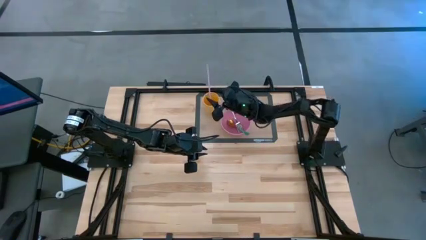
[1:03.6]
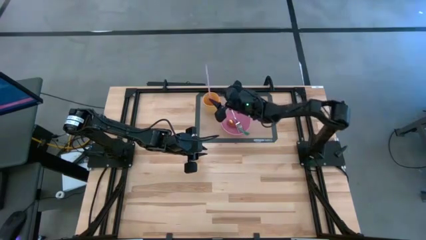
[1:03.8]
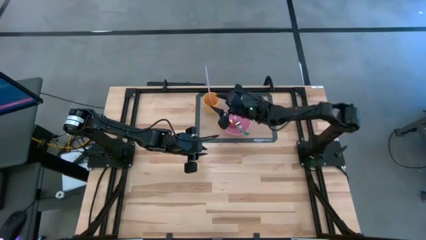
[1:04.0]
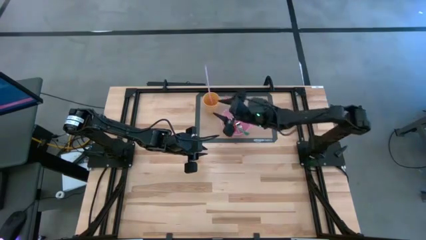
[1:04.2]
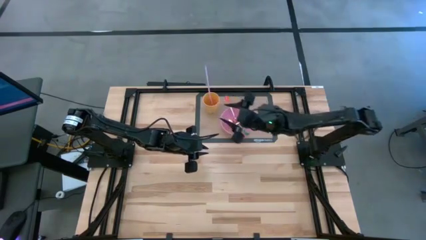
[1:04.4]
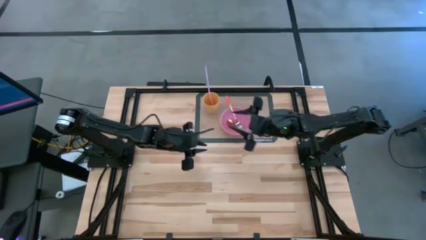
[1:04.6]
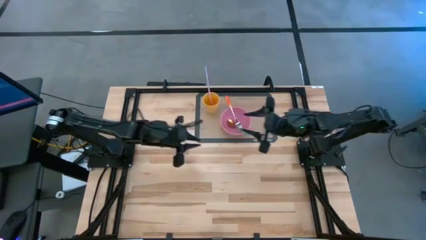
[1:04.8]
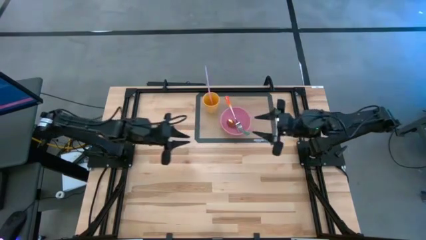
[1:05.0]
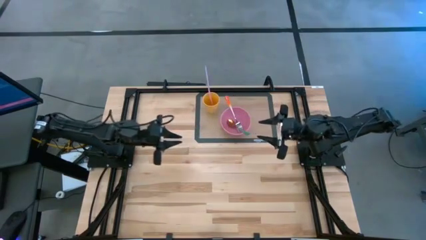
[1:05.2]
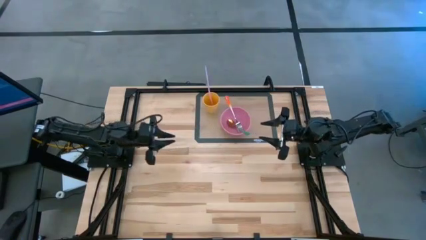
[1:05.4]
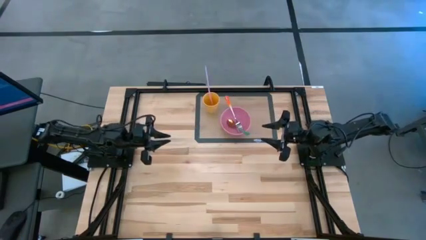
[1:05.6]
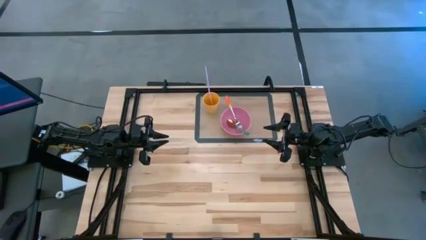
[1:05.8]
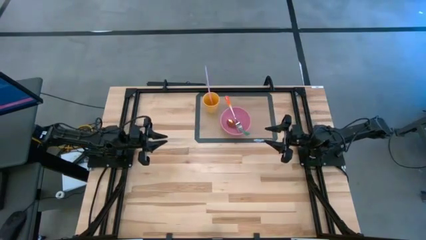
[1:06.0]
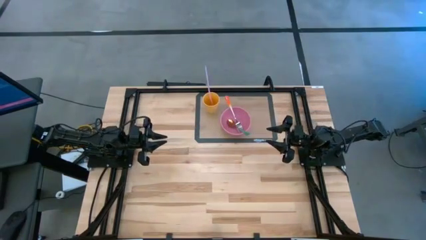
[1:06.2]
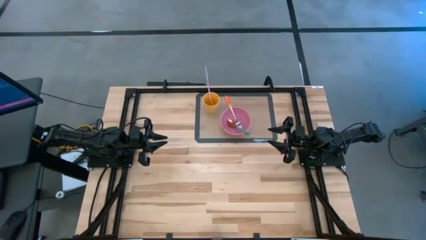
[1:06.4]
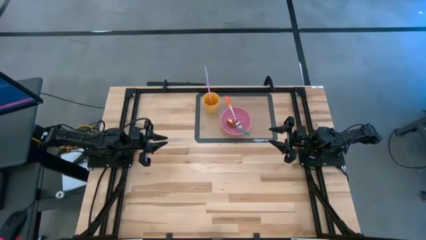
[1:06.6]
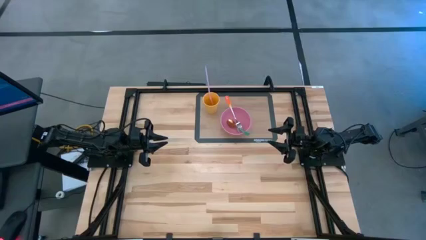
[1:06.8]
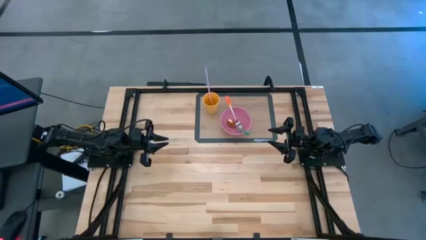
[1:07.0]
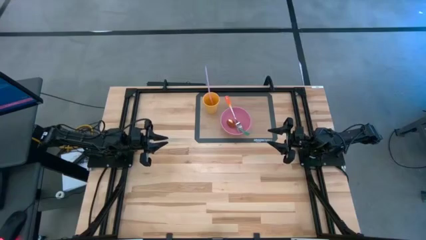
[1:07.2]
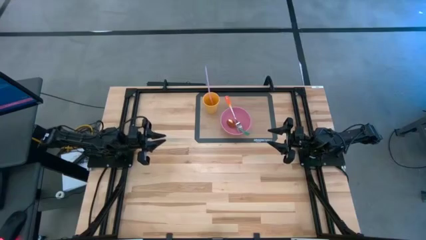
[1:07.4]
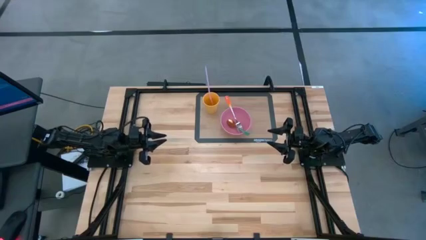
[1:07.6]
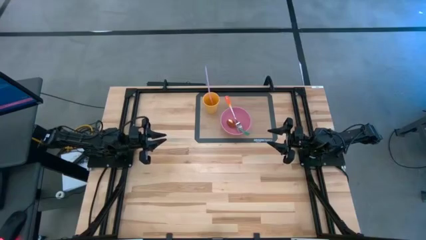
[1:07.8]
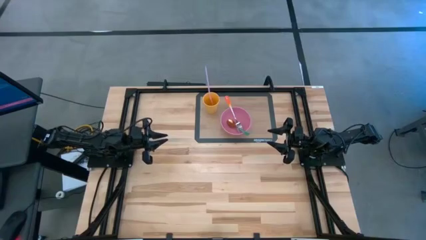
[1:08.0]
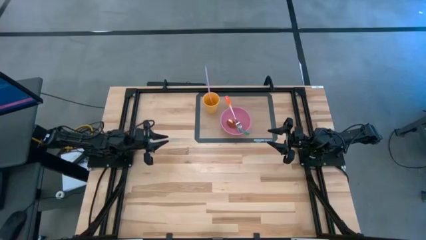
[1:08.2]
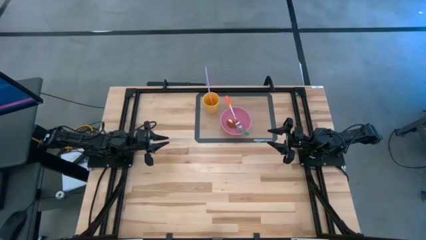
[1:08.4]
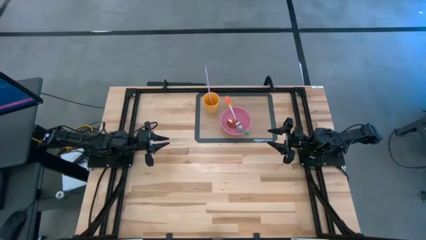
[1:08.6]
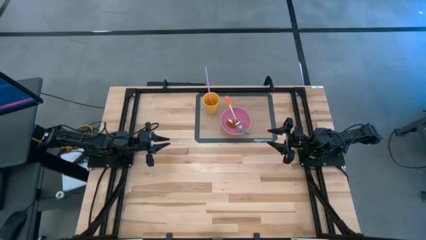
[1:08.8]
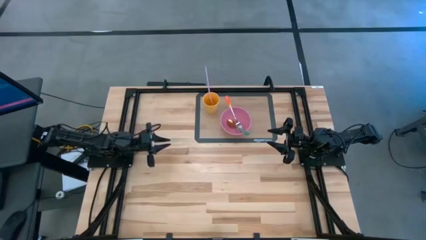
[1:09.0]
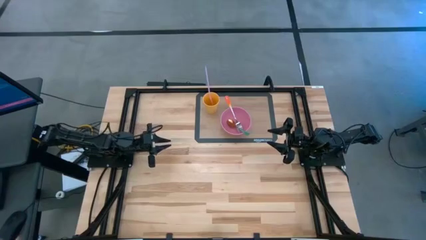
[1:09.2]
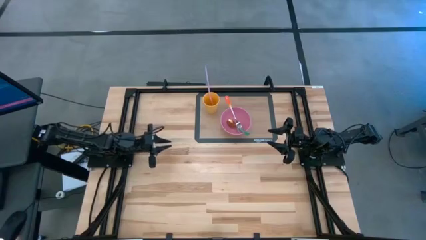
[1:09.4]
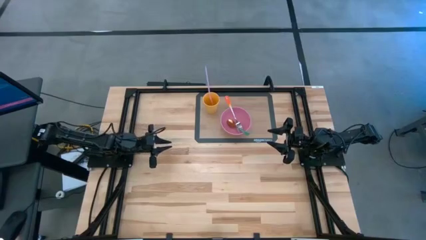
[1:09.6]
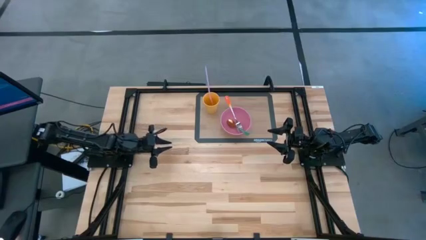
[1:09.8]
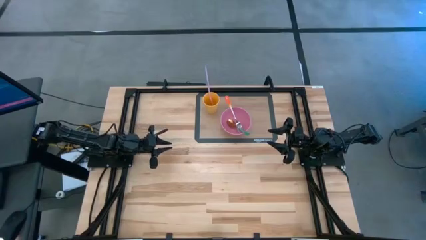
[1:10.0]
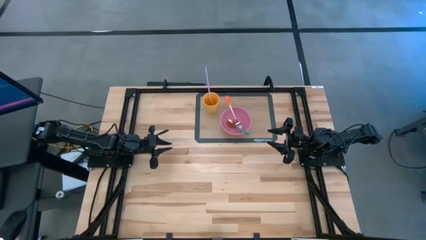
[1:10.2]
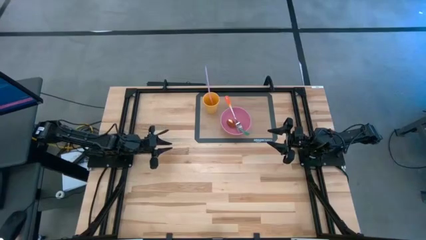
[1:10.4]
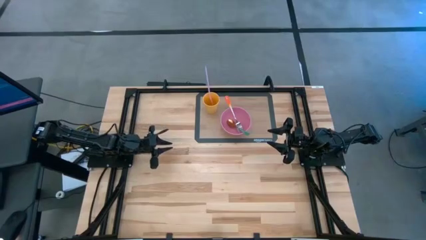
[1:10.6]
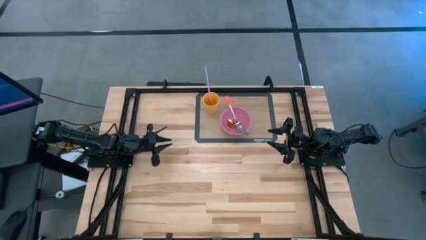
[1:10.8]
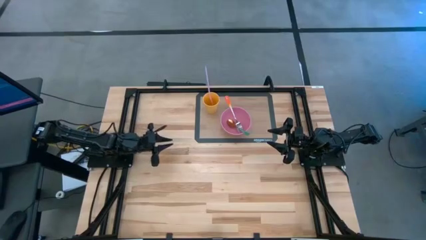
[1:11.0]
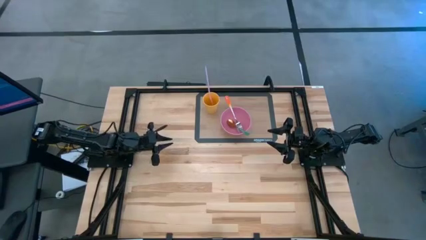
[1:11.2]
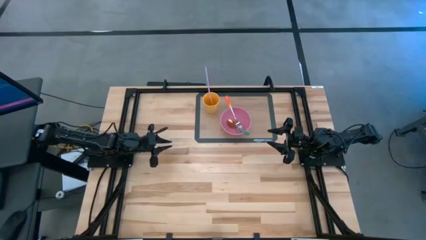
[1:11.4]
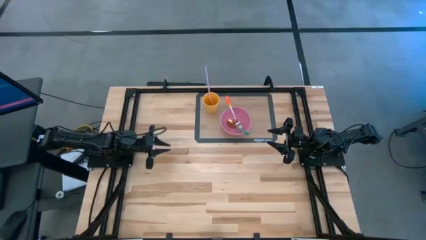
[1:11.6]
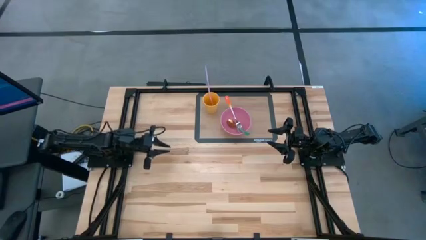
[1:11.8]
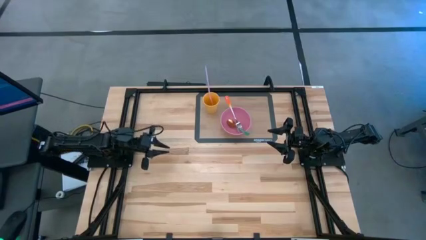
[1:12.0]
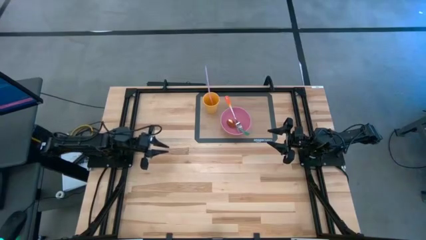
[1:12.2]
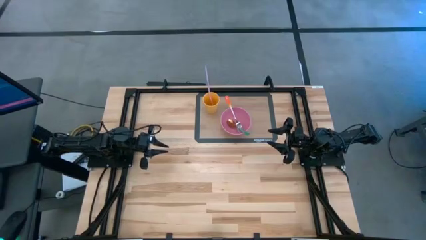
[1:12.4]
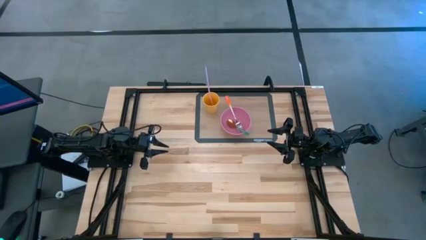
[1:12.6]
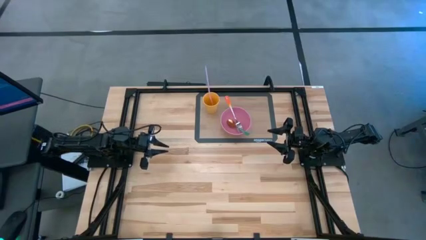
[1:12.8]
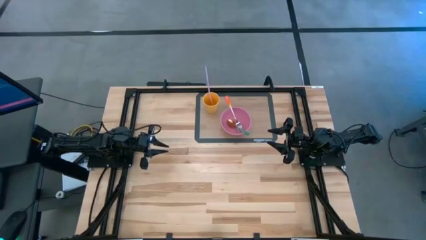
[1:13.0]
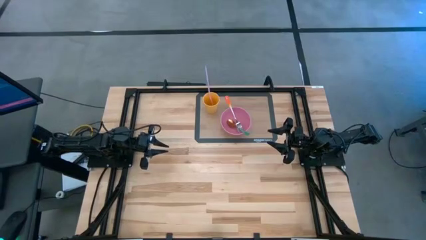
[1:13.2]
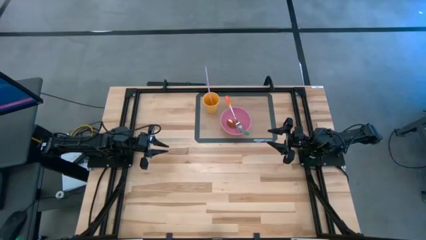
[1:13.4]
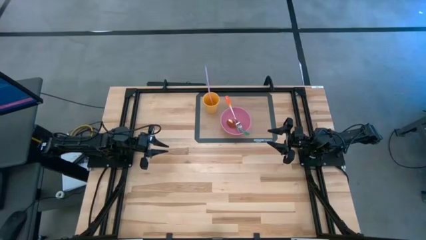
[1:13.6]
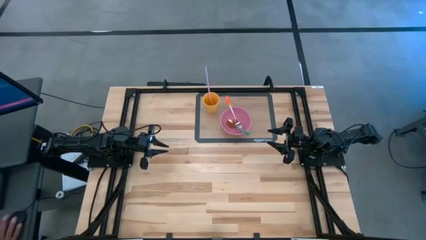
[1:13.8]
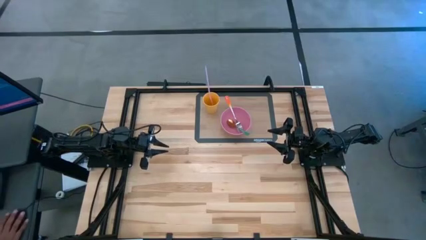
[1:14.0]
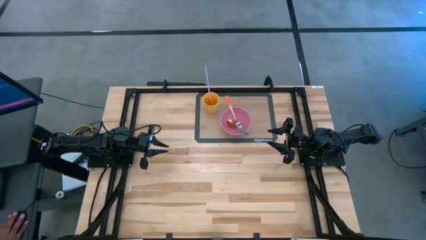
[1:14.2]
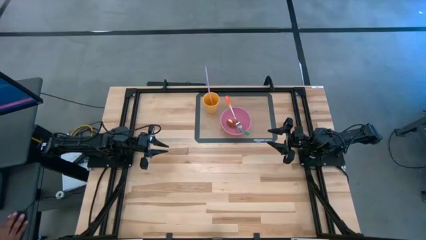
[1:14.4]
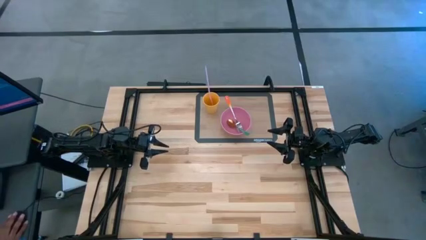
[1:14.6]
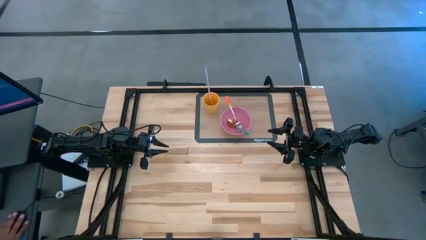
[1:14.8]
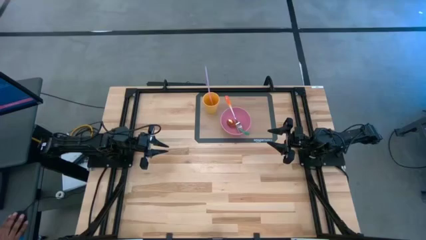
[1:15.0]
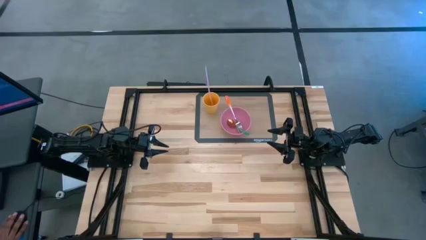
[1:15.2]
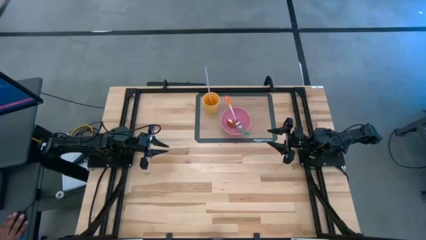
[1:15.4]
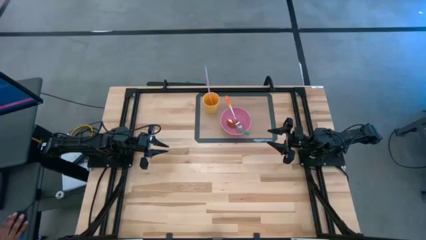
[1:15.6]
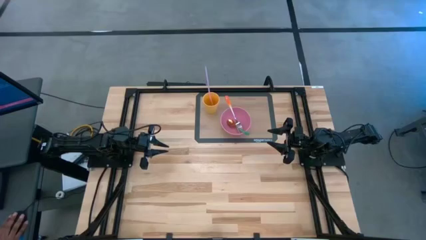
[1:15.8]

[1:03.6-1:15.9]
Task: Pick & Place Utensil
Return to Home Position

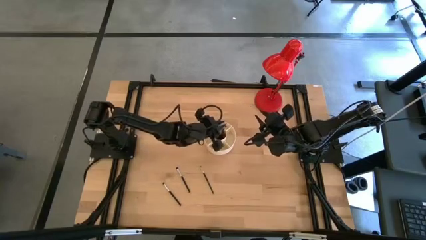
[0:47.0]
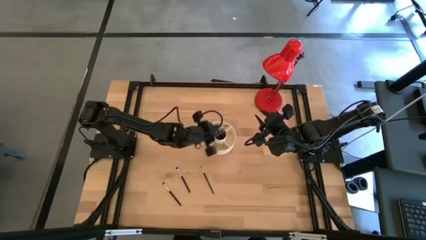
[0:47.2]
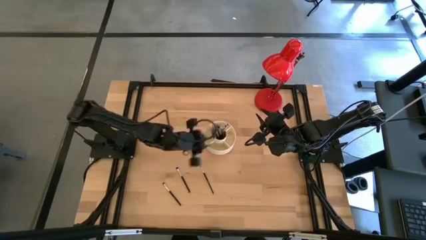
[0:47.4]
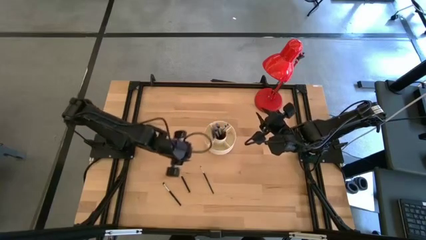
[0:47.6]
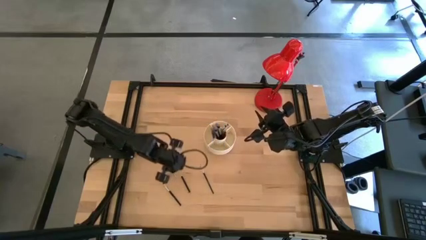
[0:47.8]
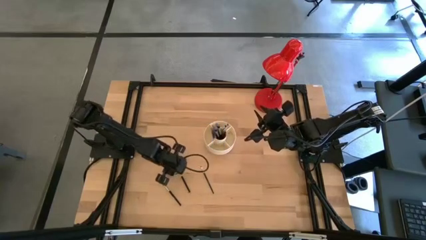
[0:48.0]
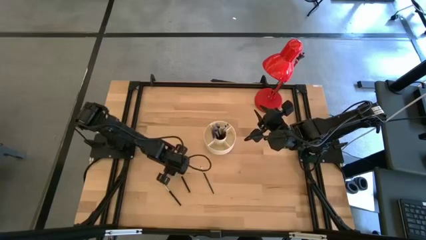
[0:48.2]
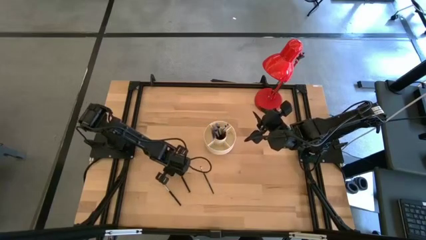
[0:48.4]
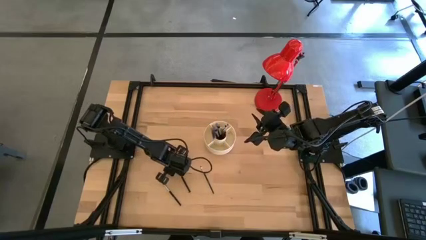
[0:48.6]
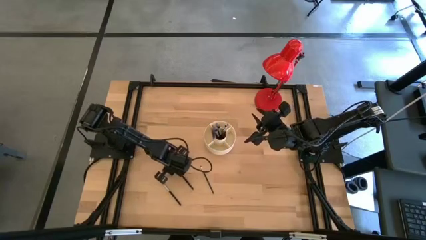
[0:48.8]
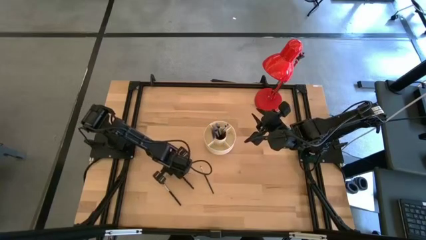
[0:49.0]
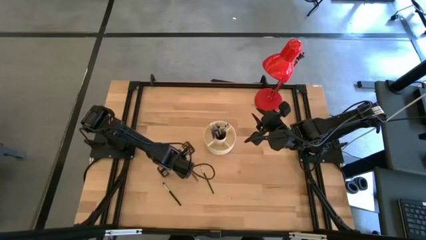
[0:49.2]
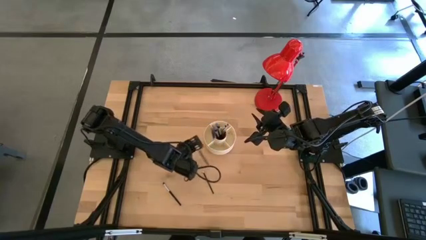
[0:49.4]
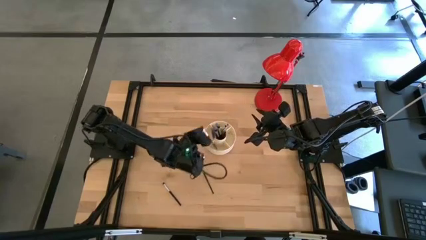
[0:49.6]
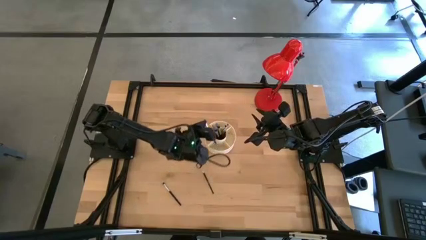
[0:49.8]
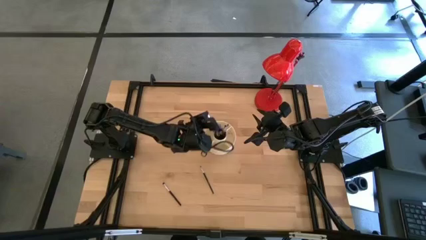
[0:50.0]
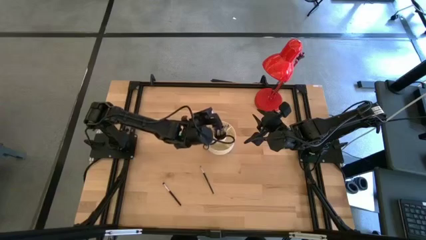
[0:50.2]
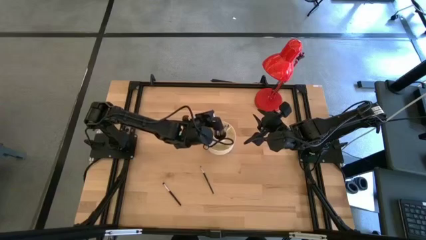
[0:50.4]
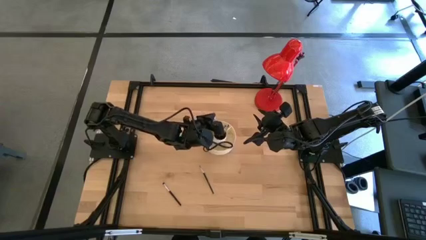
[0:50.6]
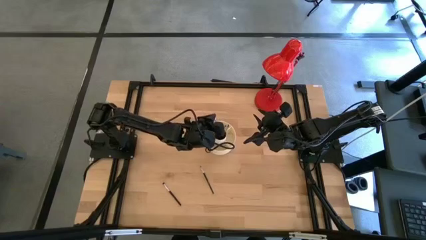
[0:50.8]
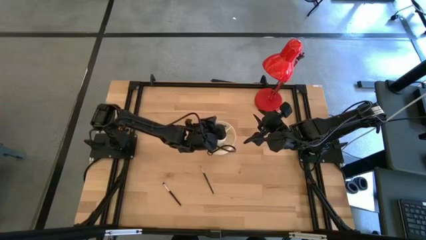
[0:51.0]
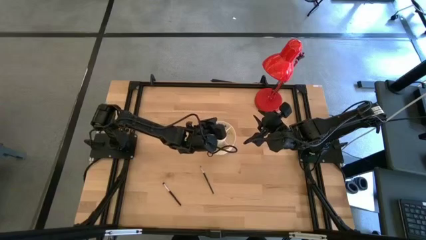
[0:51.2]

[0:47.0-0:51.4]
Task: Put items in baskets/containers
Put the eyeshadow brush into the brush organizer
